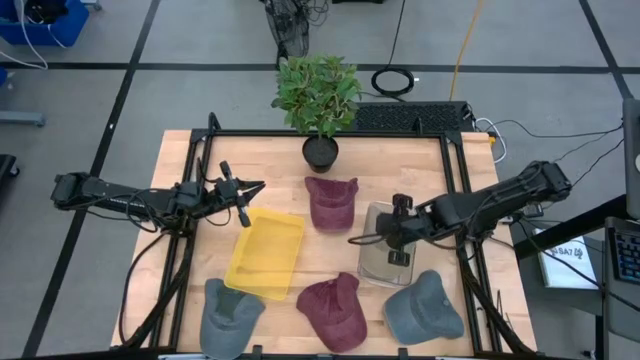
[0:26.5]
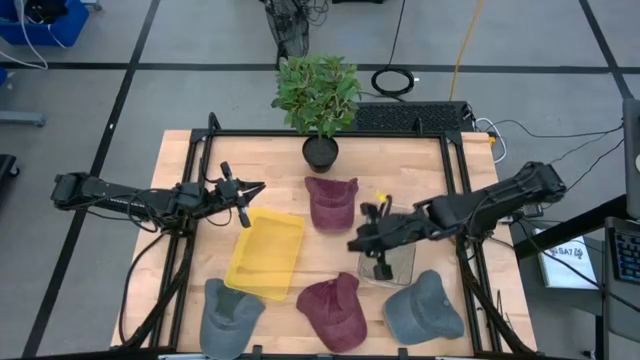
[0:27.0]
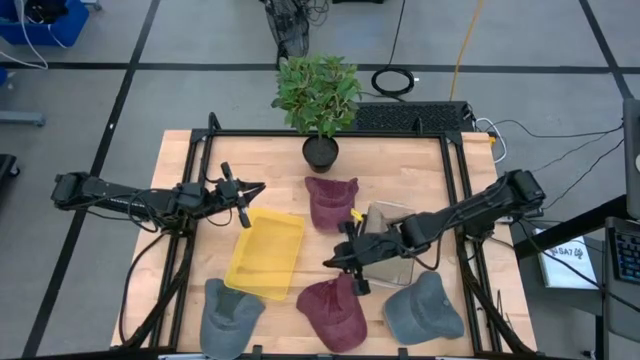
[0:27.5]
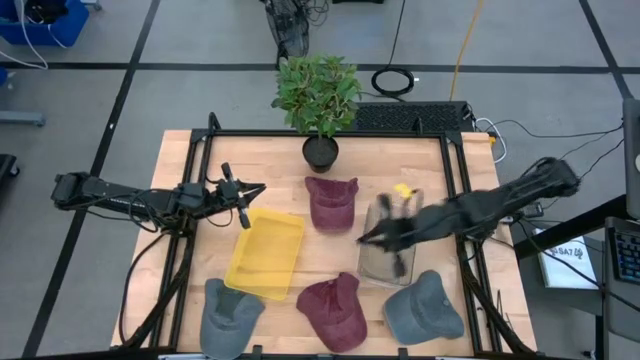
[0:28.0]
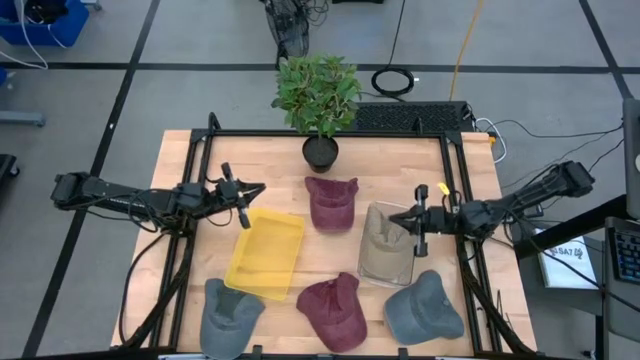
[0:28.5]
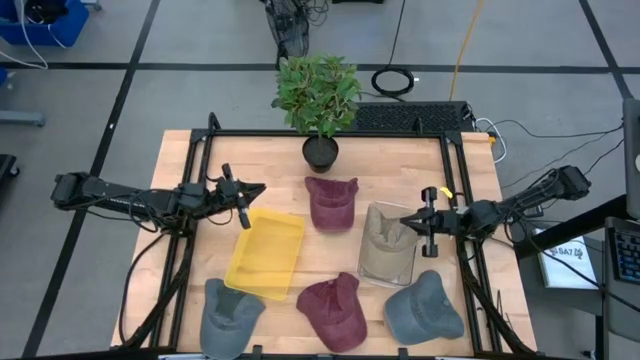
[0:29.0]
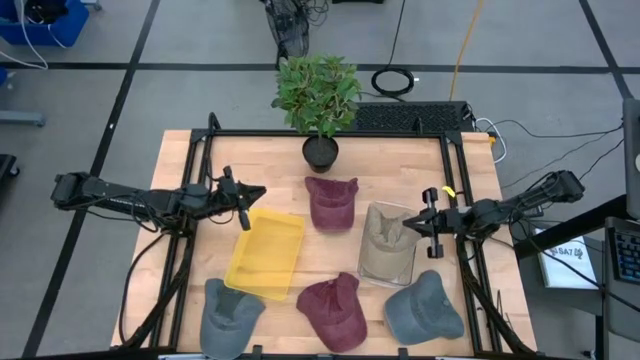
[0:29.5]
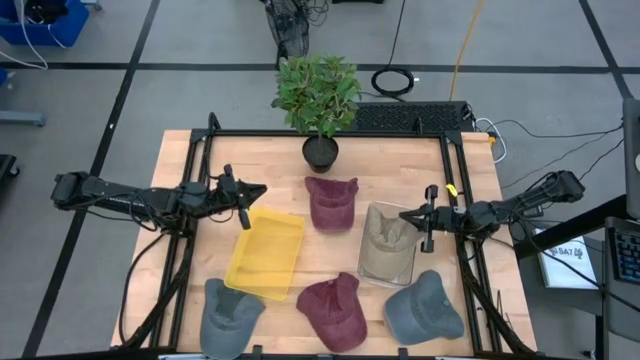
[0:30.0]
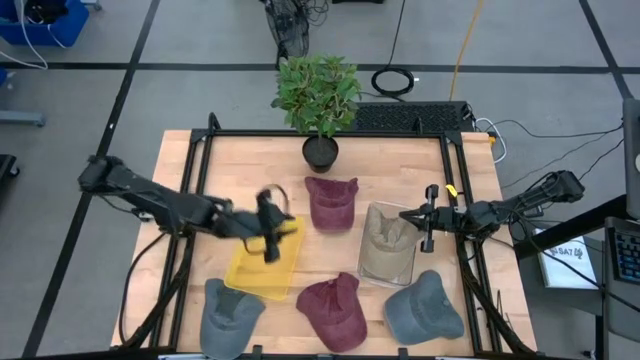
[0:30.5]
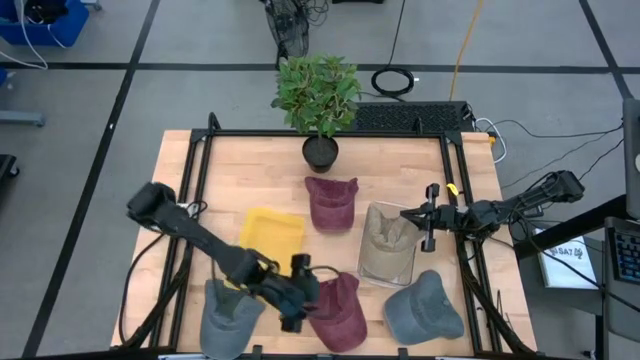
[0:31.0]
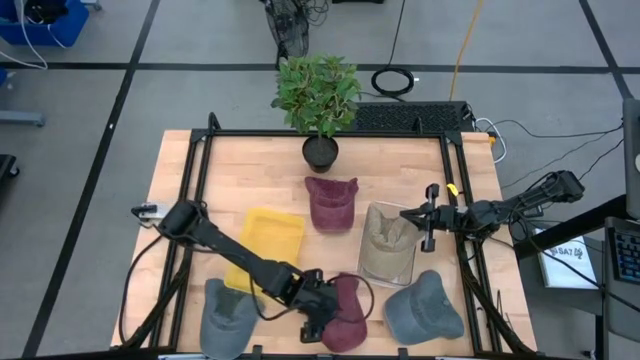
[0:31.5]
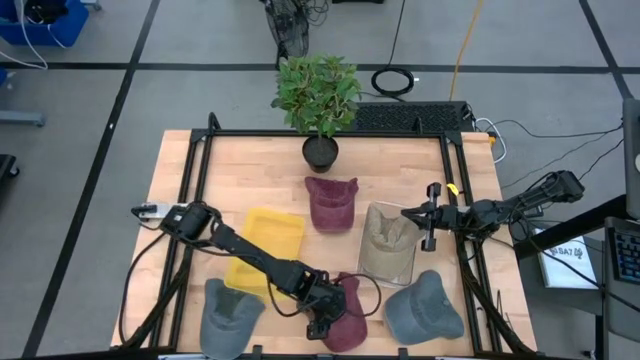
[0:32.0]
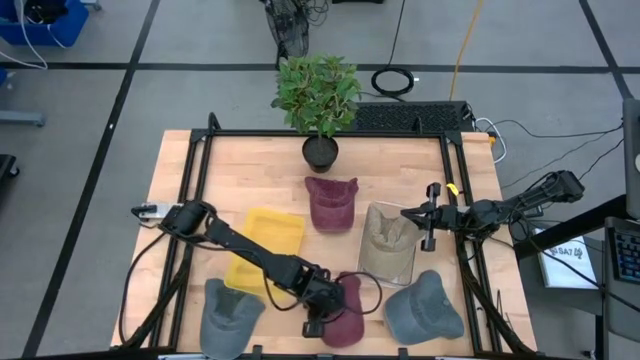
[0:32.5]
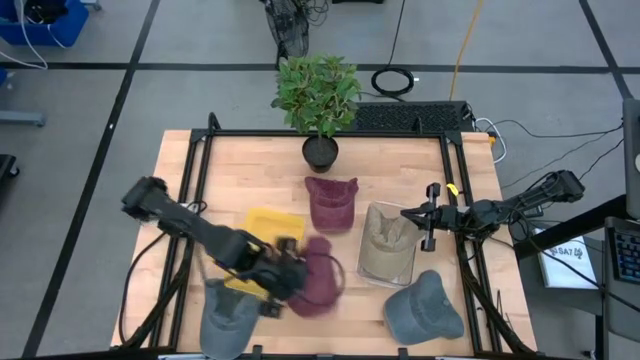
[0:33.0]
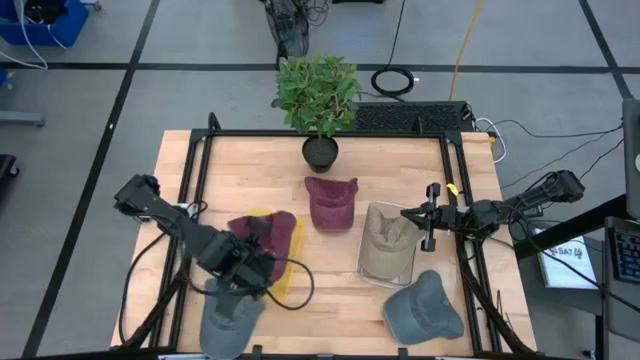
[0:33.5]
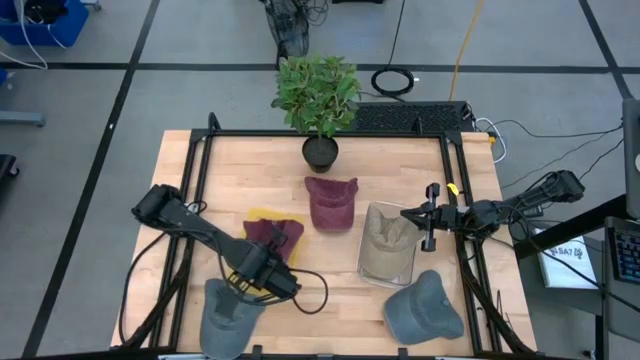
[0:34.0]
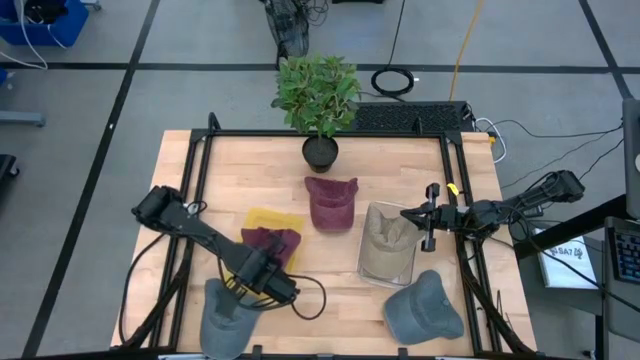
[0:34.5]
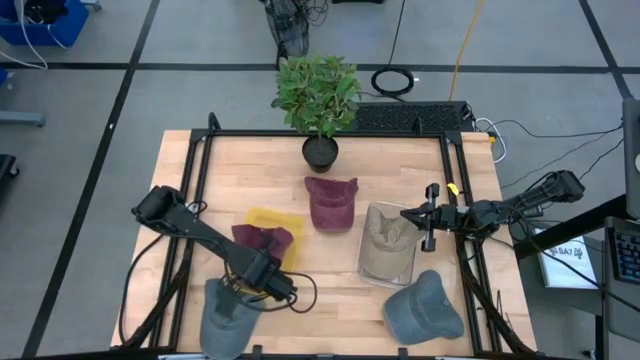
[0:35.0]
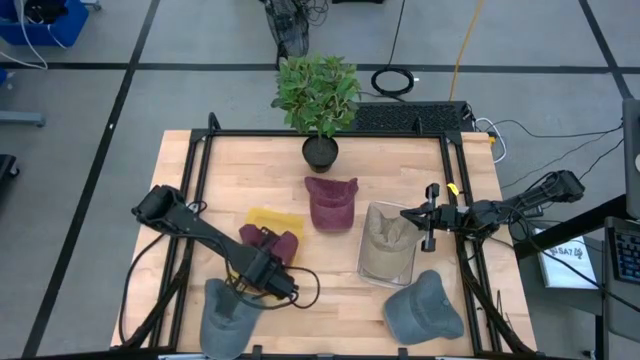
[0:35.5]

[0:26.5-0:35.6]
Task: Pick & Place hat
Put the bottom red cap into the yellow bin

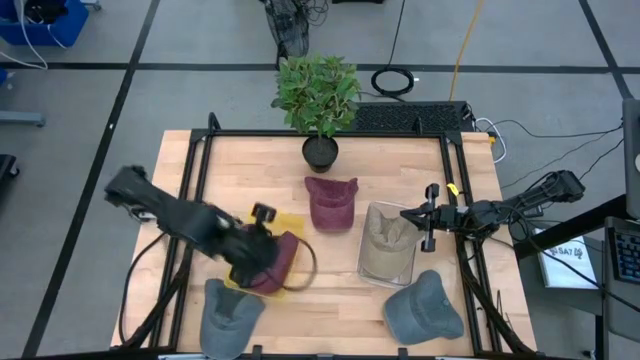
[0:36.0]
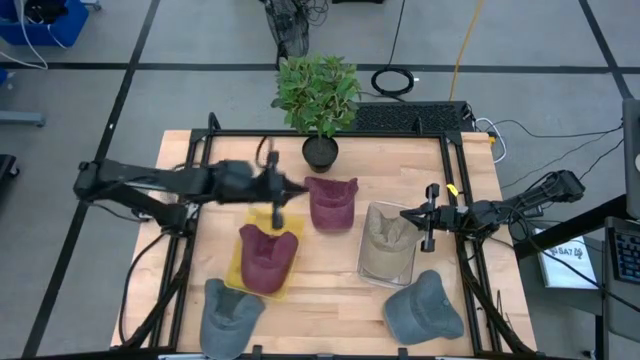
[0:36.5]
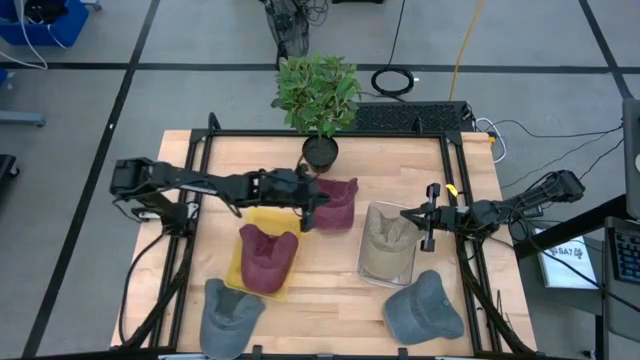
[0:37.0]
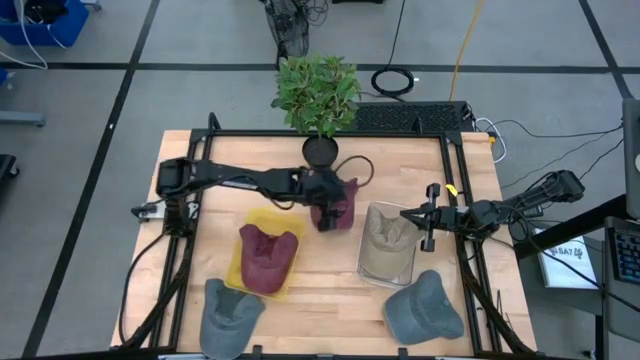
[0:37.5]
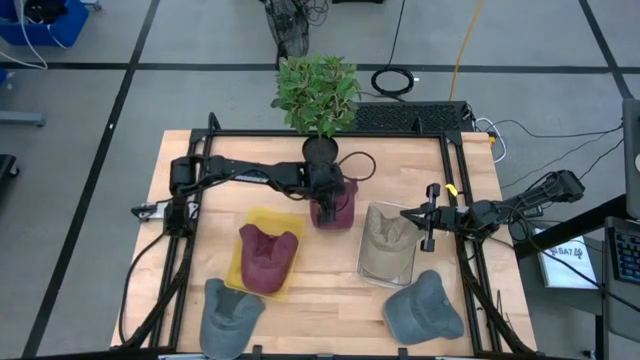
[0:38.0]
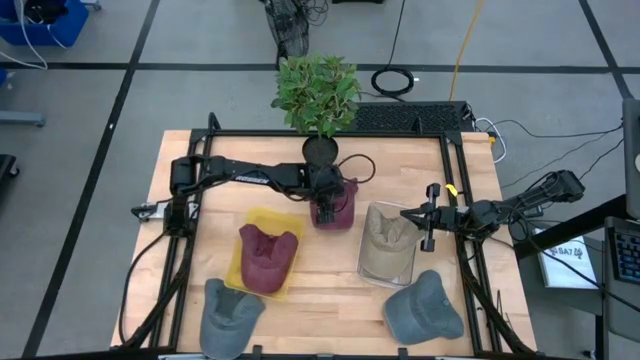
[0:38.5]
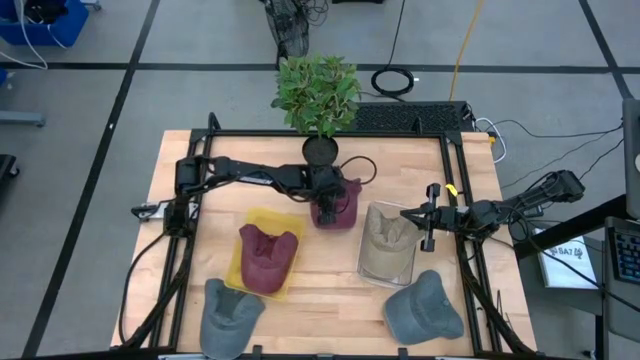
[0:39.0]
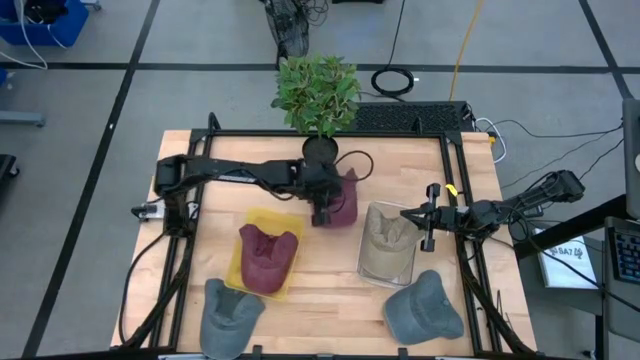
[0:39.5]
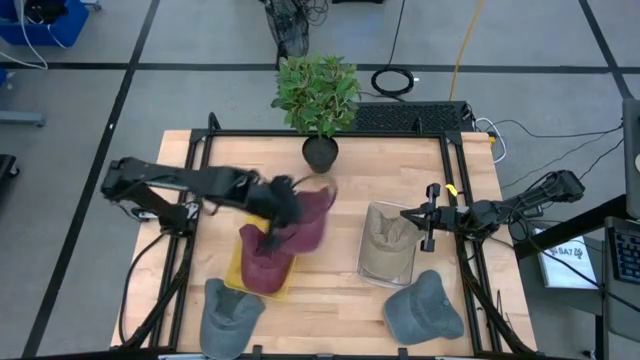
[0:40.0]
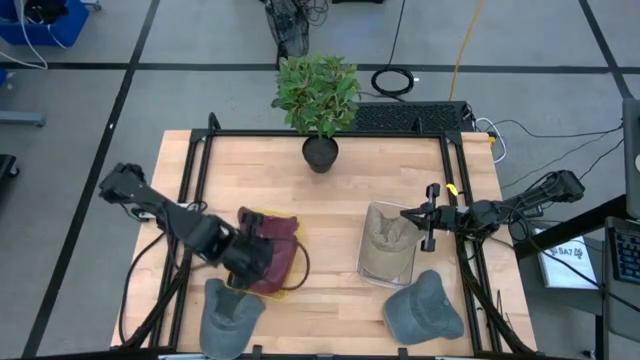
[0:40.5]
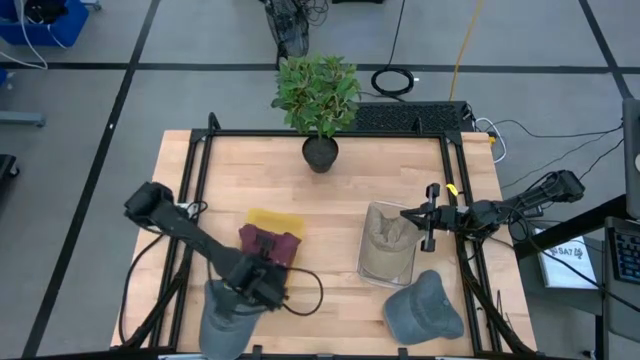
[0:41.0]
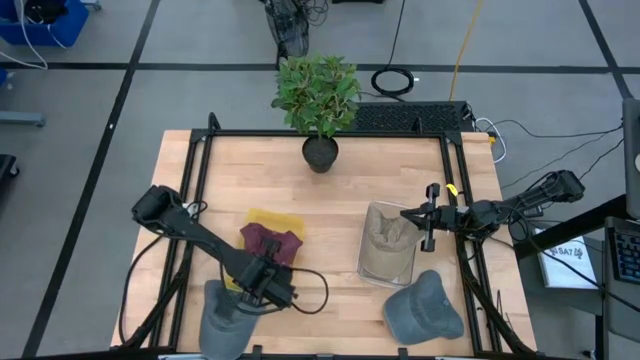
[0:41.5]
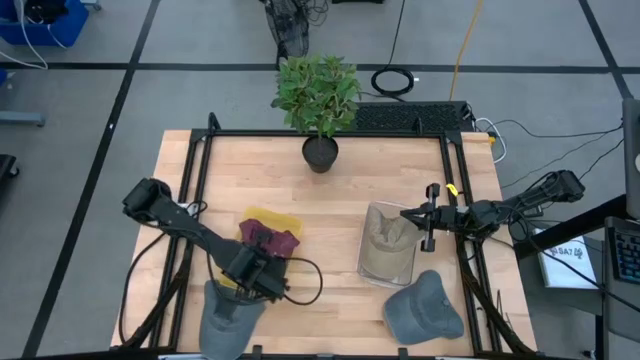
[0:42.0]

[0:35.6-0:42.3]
Put the red cap into the yellow bin

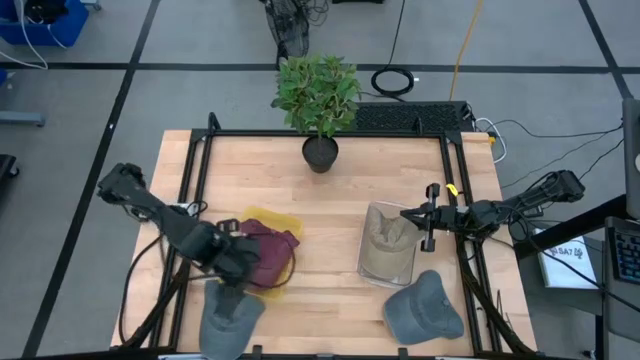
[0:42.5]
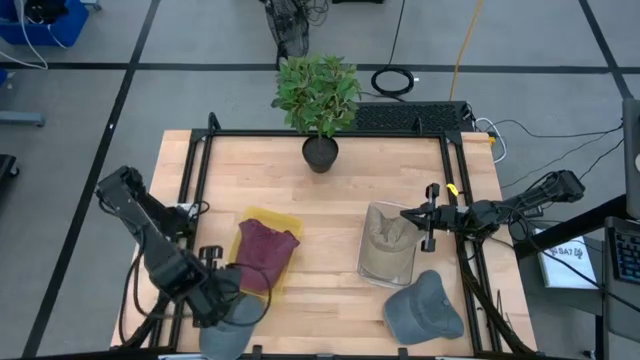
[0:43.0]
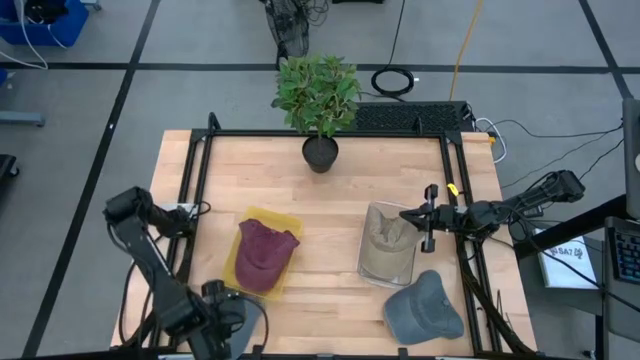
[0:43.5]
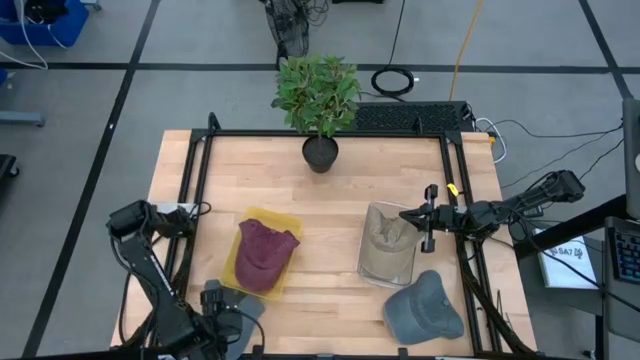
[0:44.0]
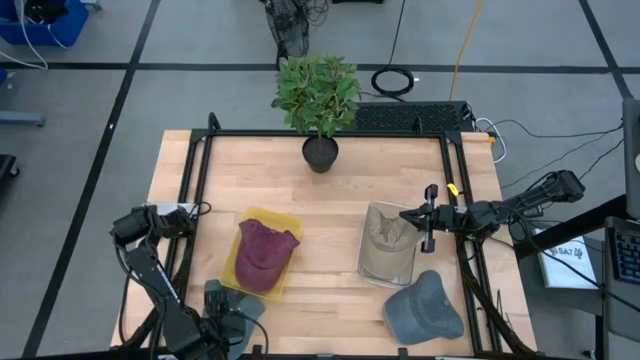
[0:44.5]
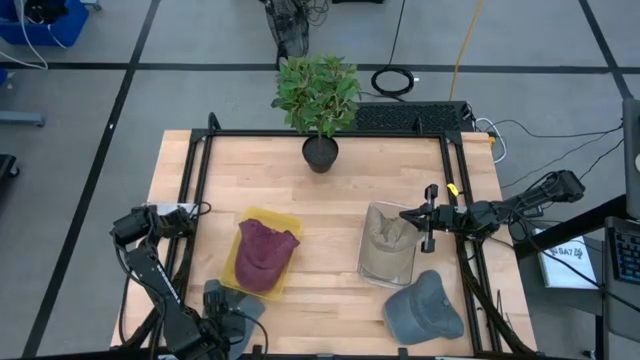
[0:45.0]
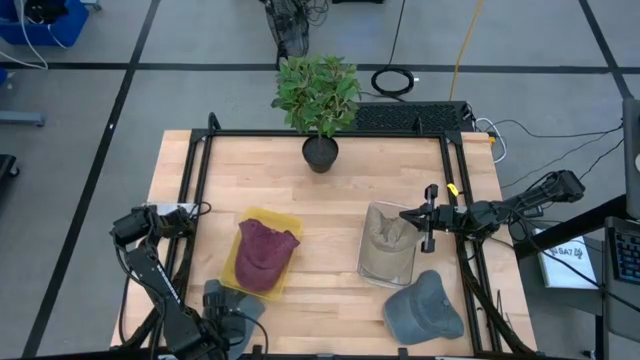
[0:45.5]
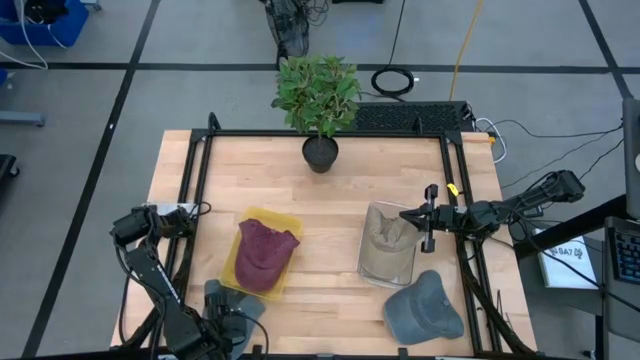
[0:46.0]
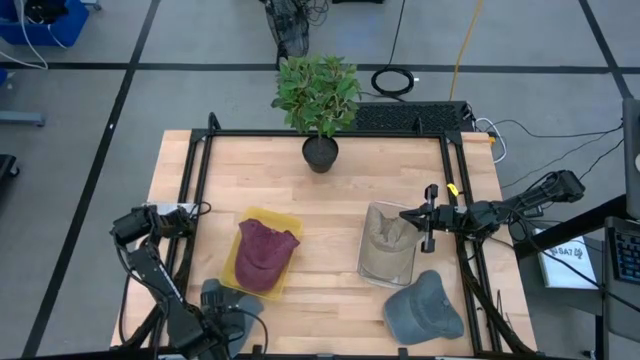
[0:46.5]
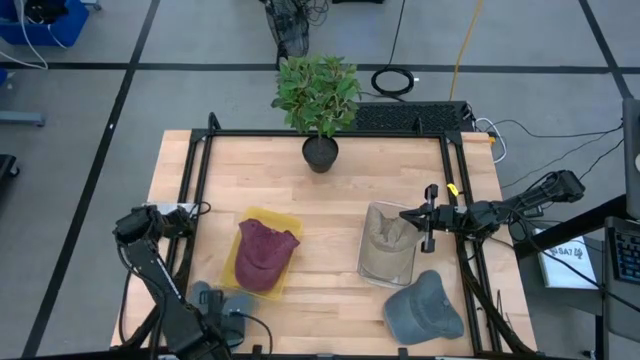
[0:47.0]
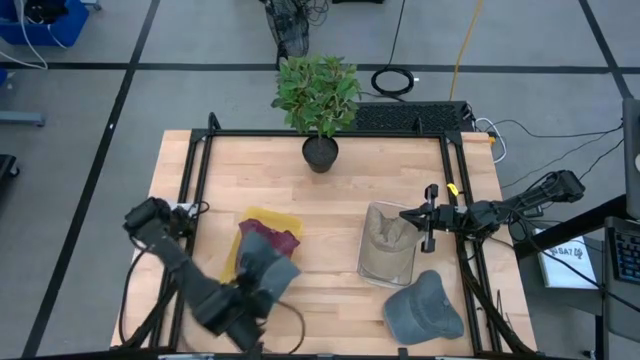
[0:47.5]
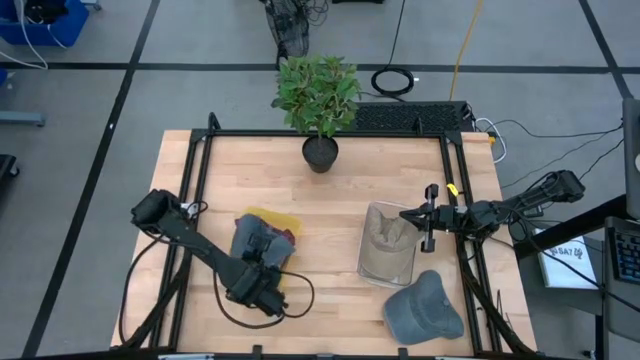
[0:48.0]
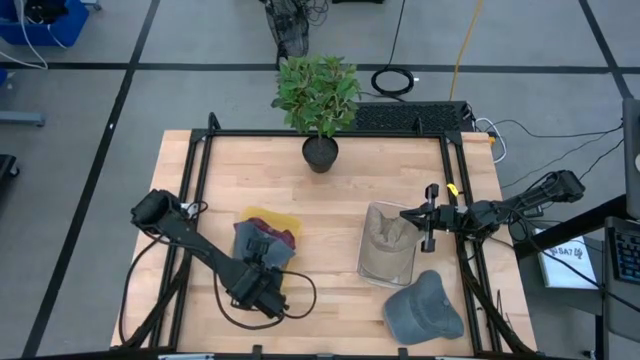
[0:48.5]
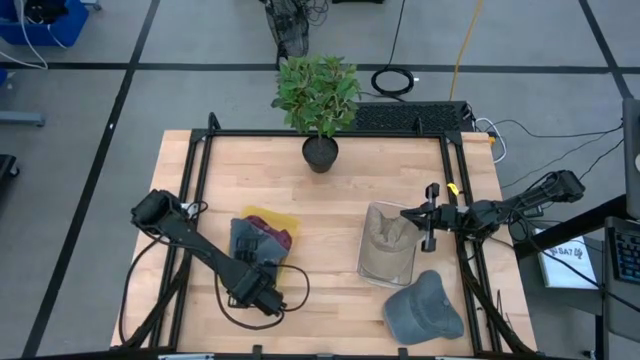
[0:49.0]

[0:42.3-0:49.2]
Put the left gray cap into the yellow bin
